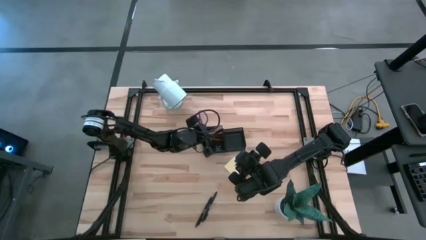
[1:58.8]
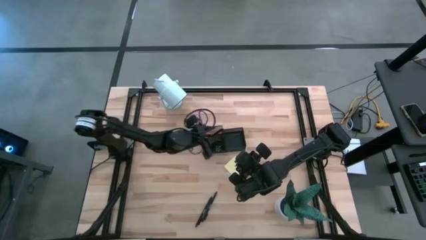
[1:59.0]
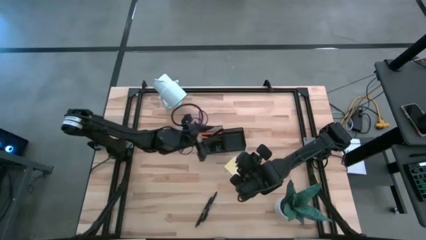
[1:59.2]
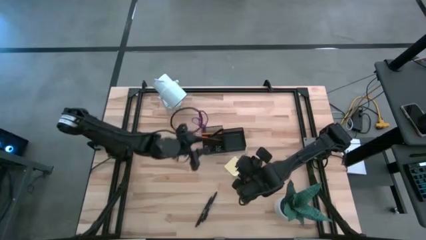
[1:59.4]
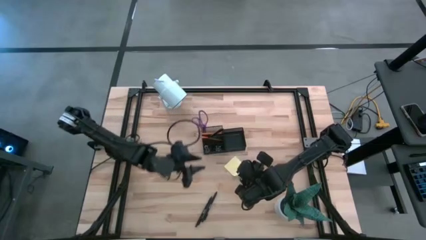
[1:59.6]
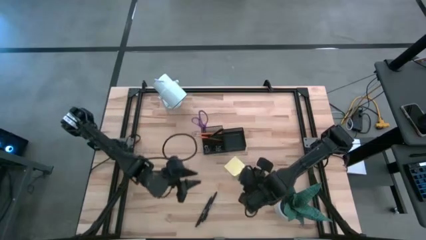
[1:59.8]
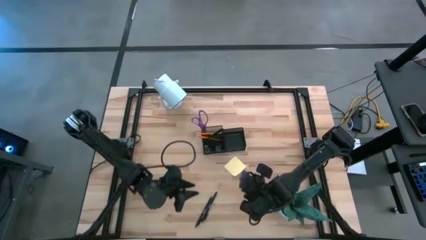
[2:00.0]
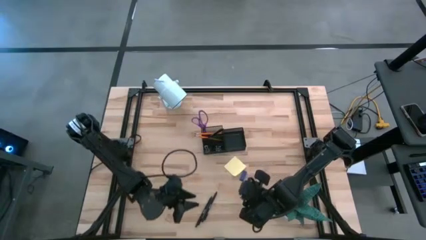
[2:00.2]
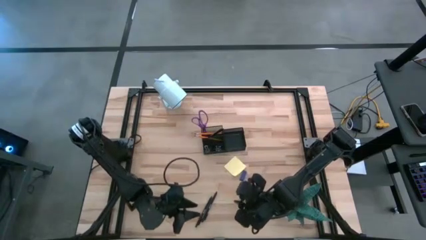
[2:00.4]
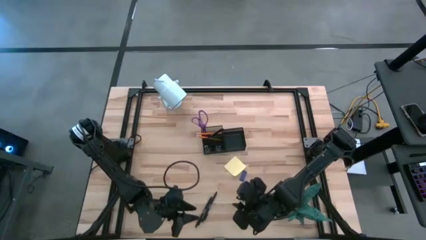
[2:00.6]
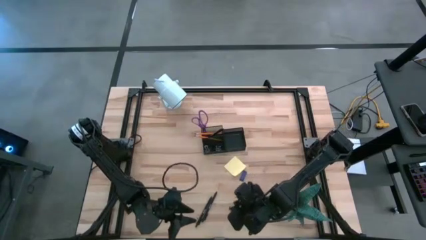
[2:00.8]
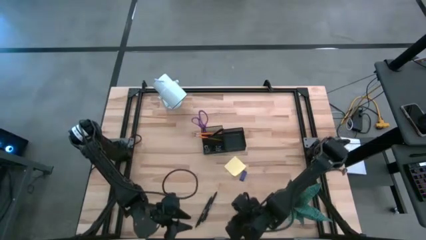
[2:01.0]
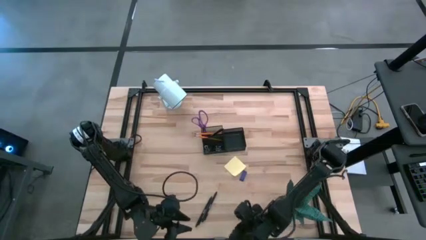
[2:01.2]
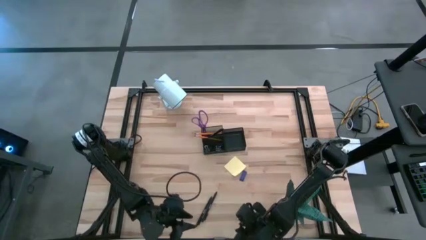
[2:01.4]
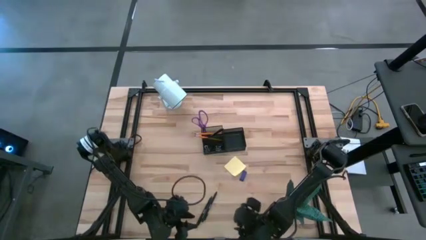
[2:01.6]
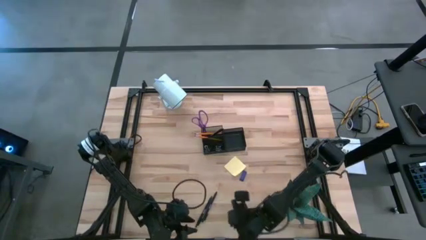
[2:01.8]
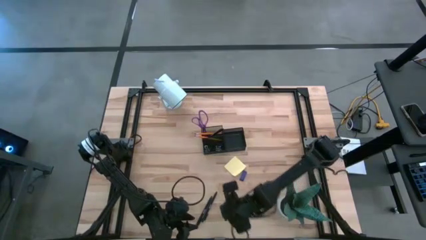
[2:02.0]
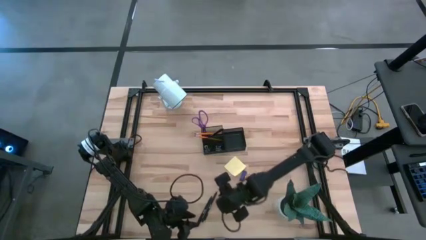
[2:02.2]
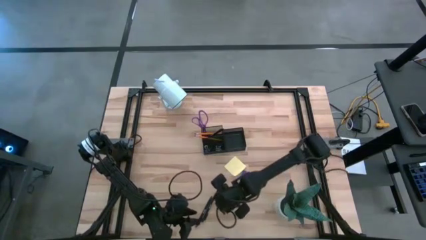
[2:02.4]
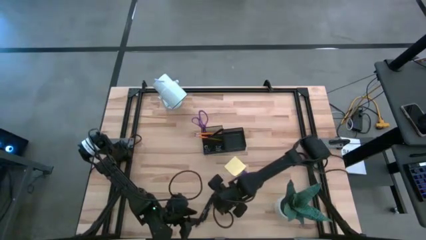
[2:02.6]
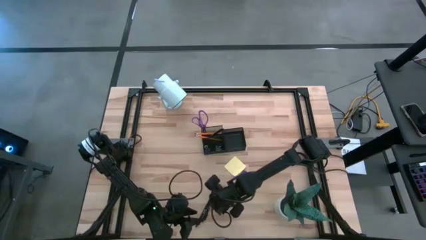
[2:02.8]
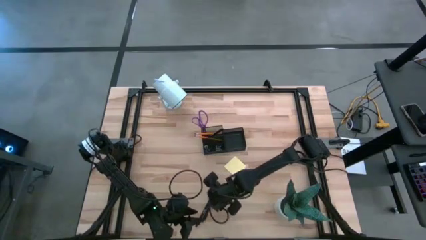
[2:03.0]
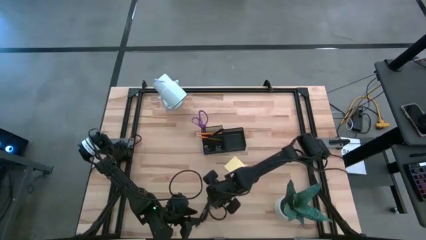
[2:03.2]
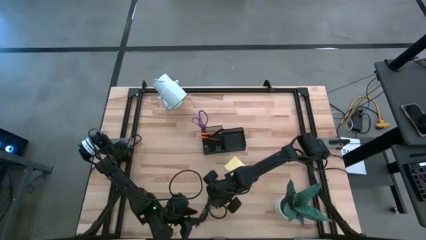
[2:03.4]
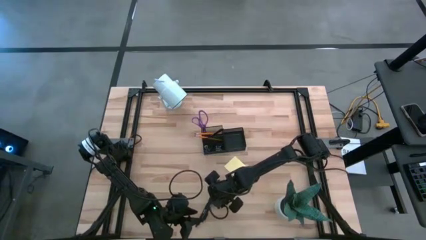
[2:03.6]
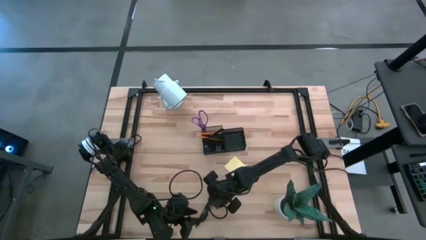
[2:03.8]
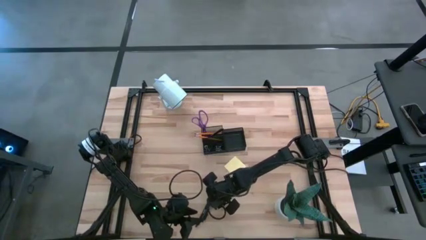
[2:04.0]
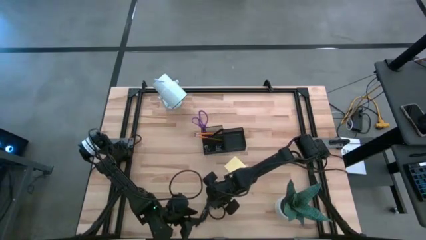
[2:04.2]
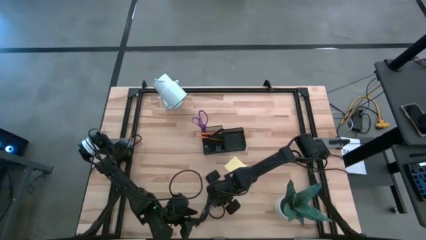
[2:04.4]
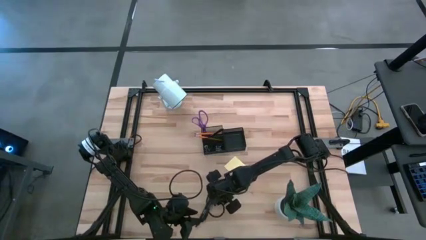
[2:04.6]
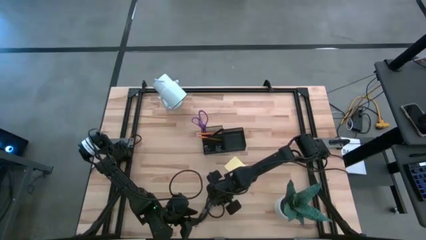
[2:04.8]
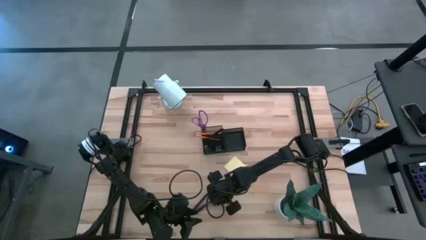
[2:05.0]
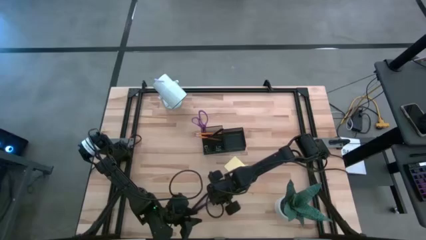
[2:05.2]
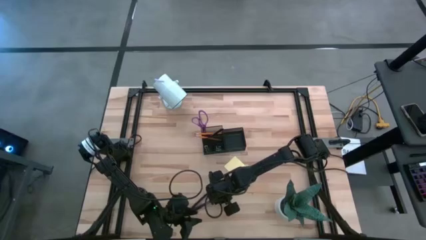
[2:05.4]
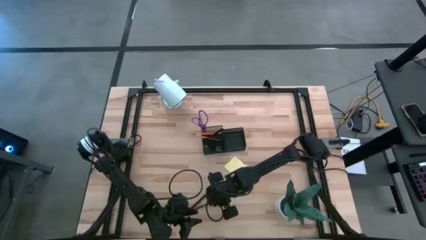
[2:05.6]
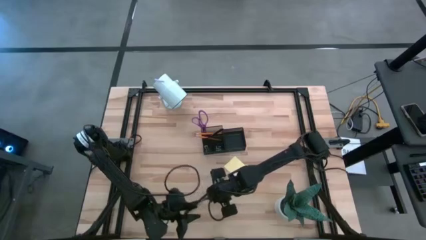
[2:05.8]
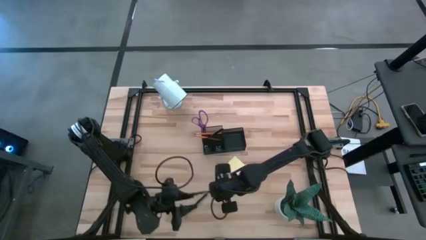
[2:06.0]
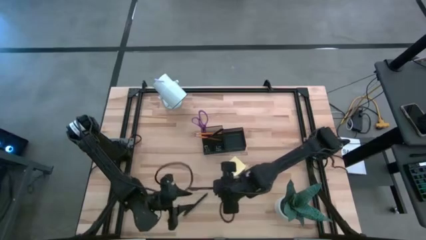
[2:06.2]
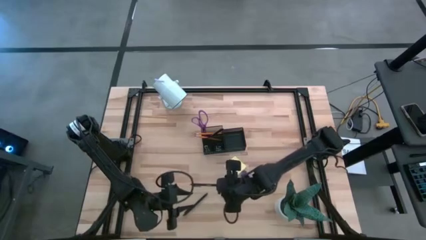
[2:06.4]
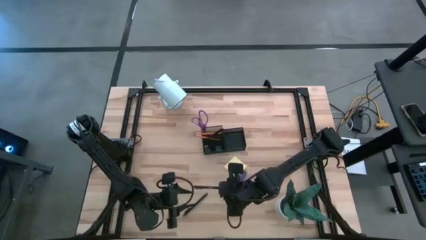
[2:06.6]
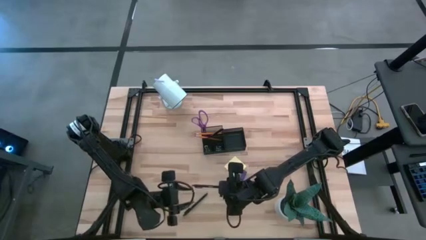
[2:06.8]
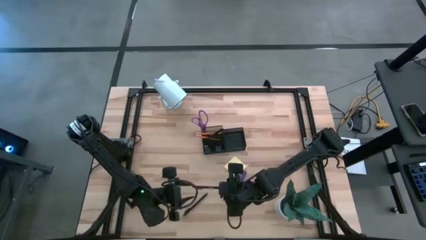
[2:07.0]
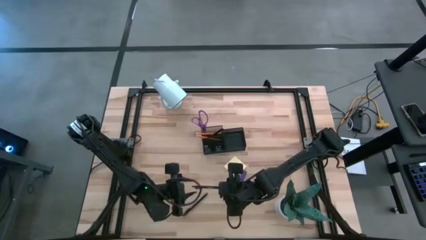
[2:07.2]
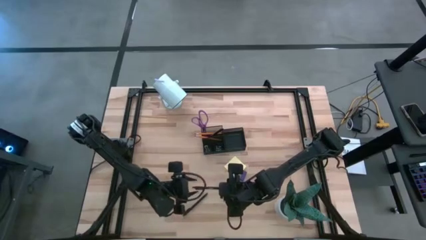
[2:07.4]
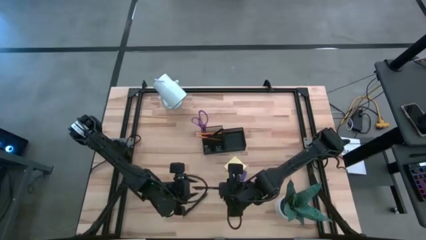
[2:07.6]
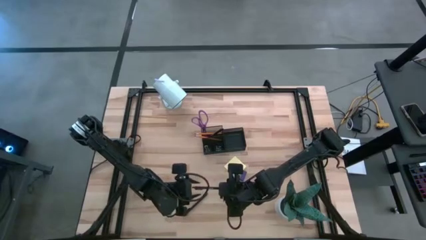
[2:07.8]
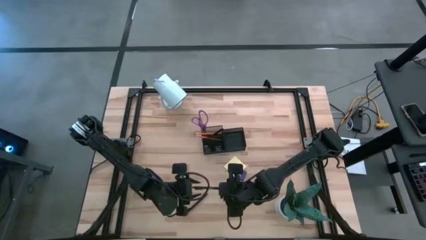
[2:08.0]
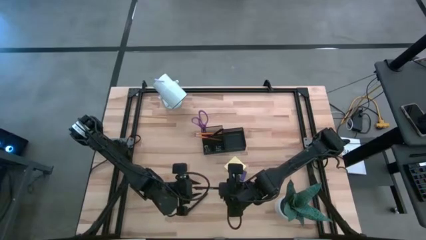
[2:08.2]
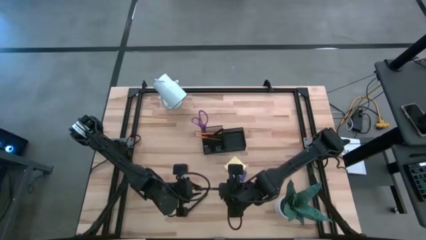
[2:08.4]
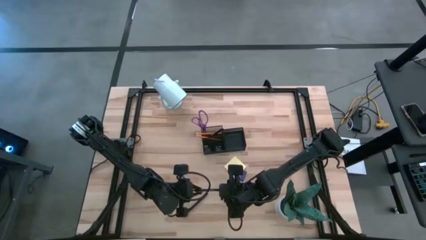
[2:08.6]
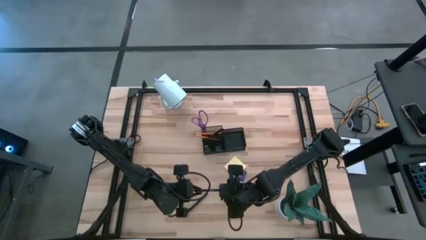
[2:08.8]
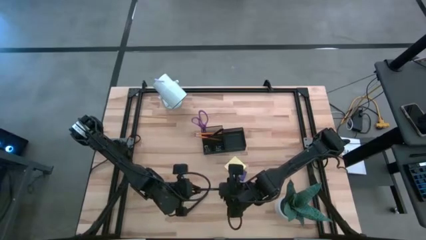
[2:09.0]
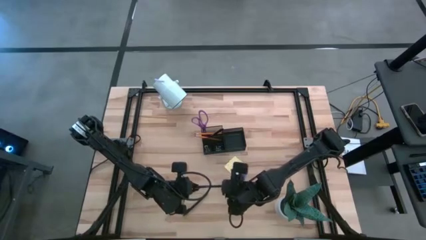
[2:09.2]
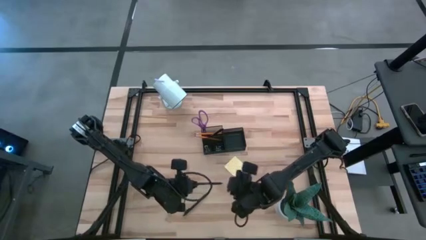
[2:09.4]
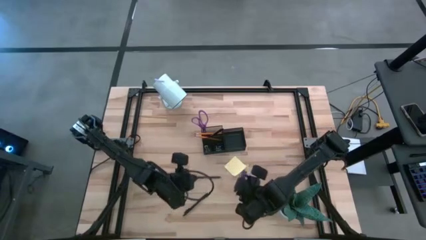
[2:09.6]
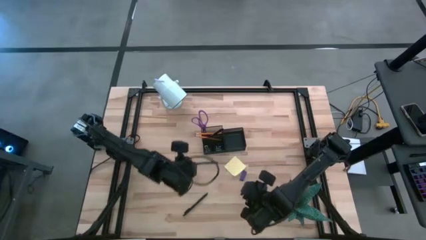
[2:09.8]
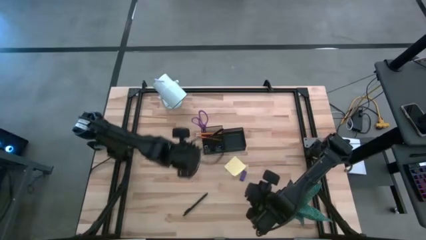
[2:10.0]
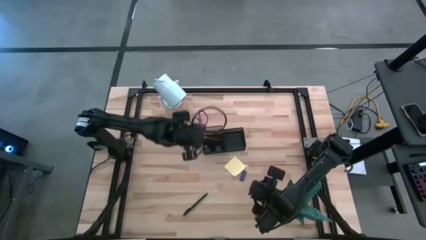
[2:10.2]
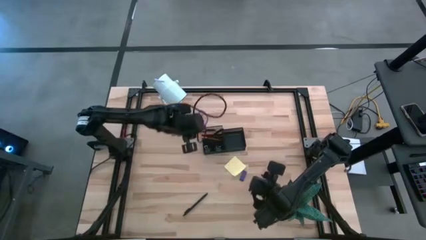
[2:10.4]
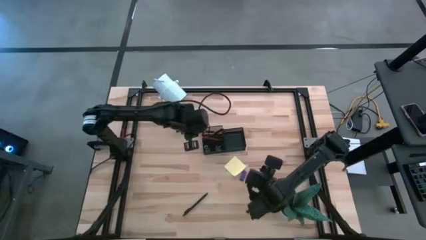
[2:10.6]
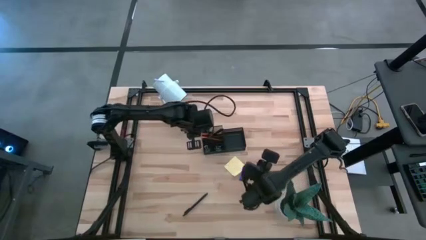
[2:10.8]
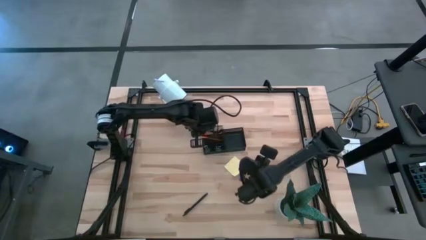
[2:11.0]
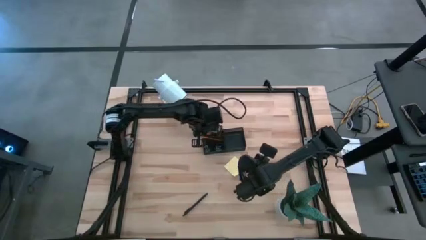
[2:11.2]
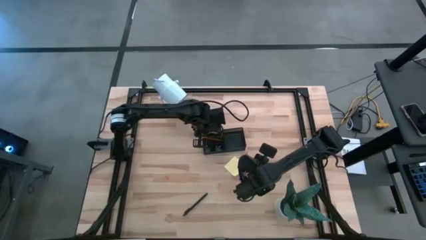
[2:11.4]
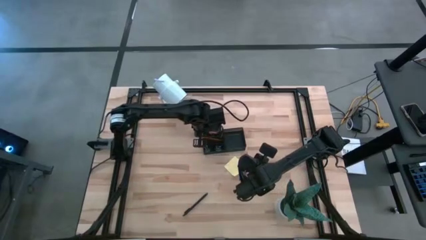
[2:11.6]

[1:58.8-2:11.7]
Task: Pick and place office supplies into organizer
Put the right black pen into the black desk organizer

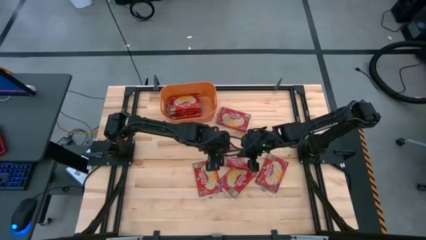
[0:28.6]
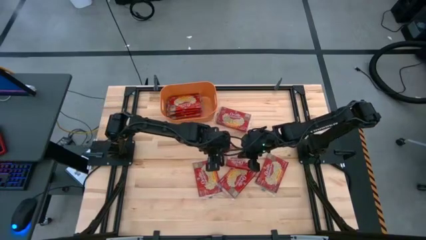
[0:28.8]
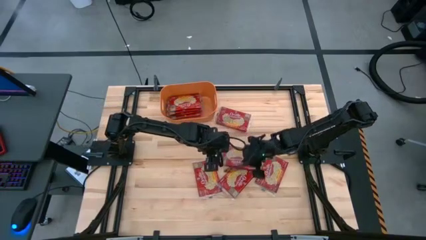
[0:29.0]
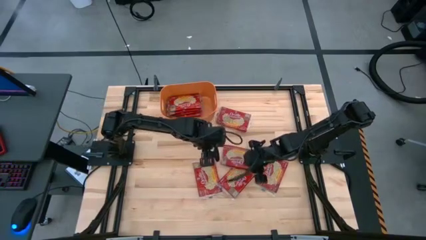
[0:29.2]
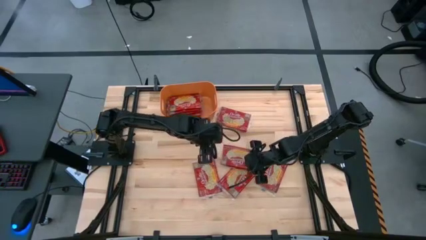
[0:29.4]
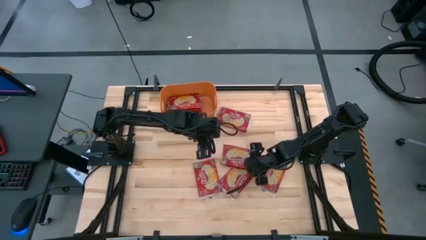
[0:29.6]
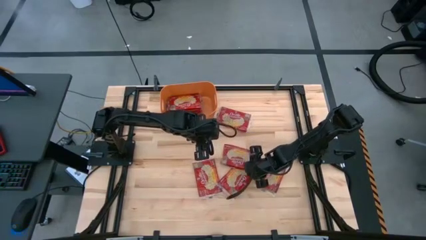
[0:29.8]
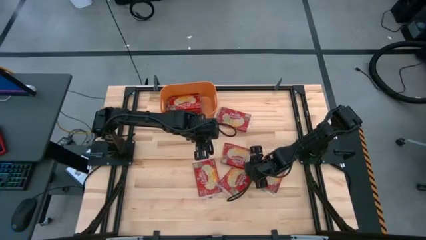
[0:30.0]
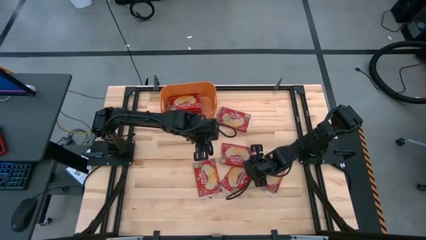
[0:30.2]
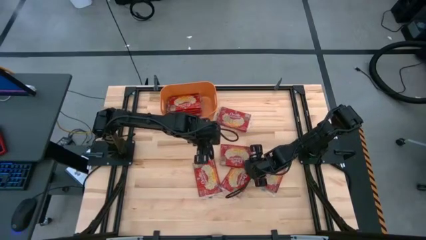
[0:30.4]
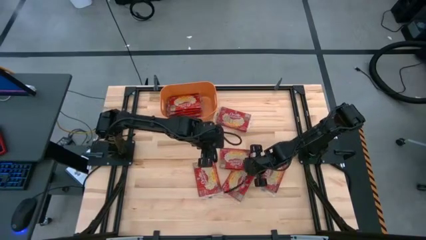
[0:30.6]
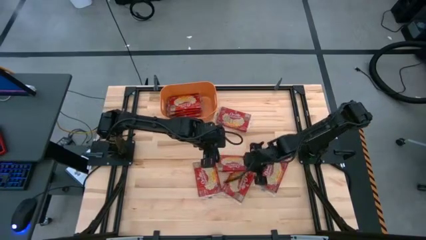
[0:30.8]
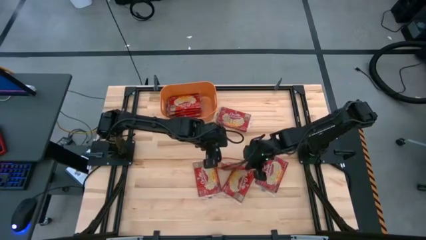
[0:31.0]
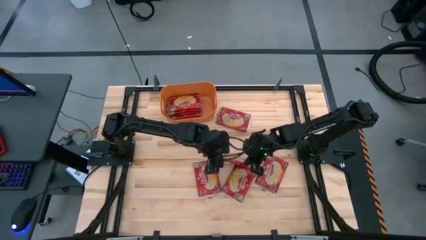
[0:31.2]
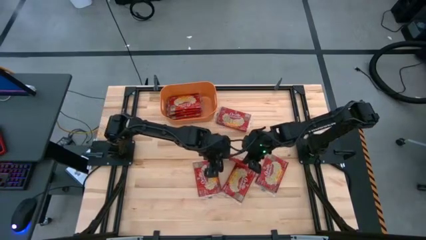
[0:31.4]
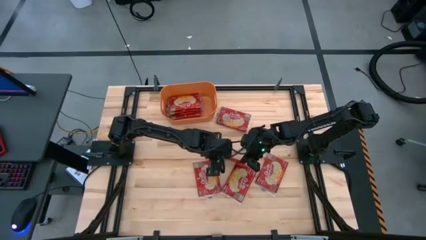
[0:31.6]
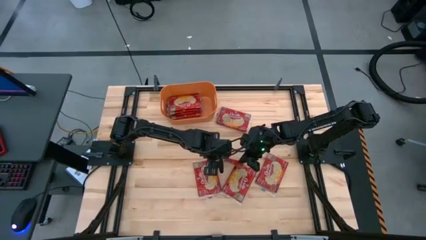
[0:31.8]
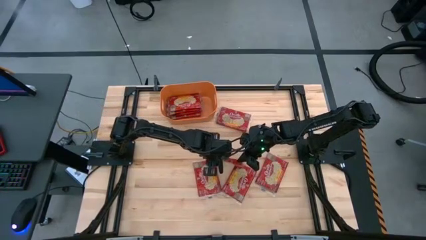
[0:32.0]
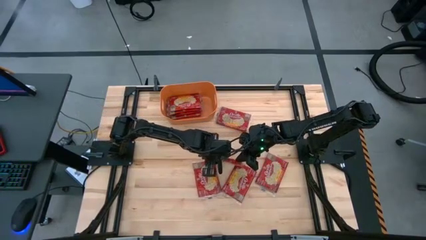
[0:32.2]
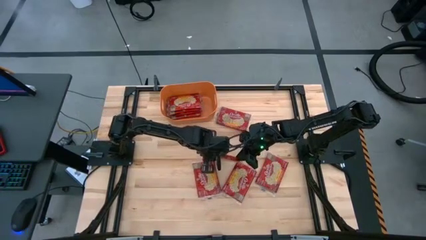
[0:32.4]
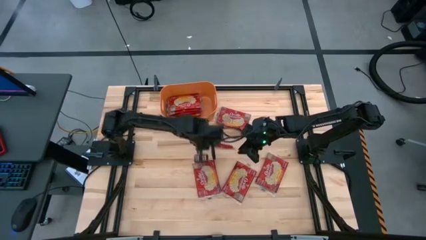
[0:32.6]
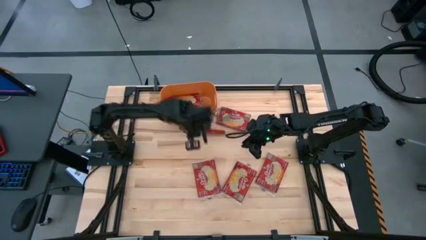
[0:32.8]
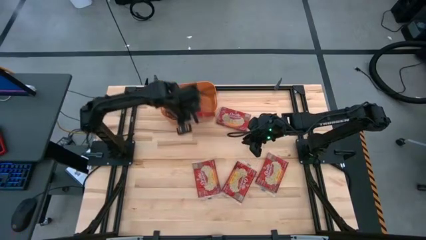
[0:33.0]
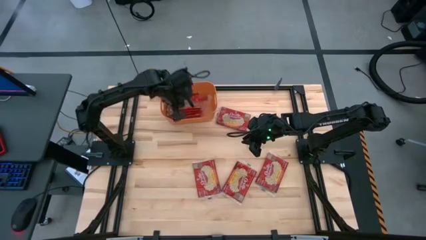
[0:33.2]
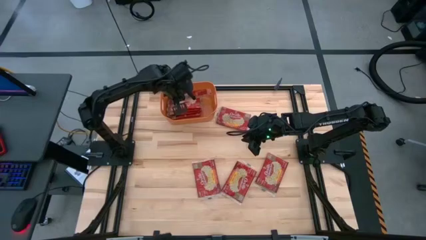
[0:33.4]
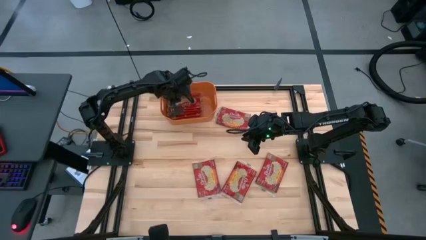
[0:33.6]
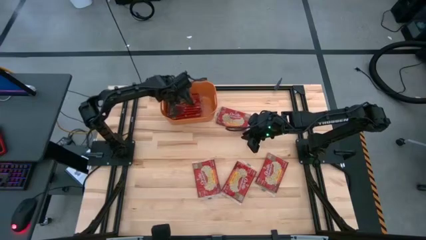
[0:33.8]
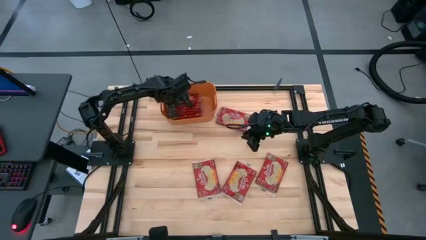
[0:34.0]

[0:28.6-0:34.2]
Task: Sort popcorn bags into baskets
Put the red popcorn bag into the orange bin
